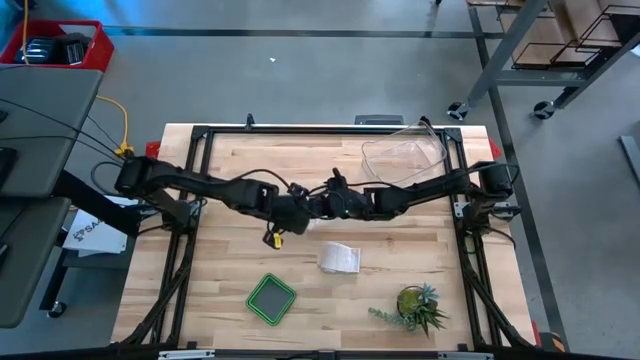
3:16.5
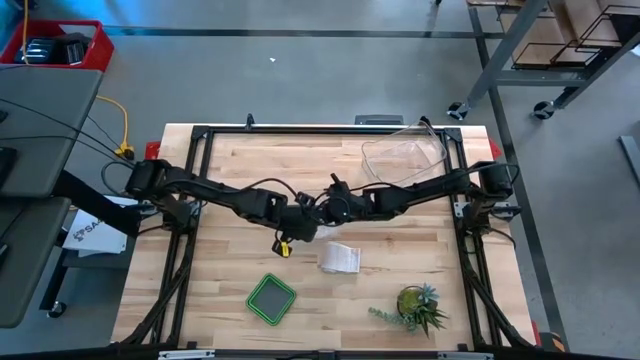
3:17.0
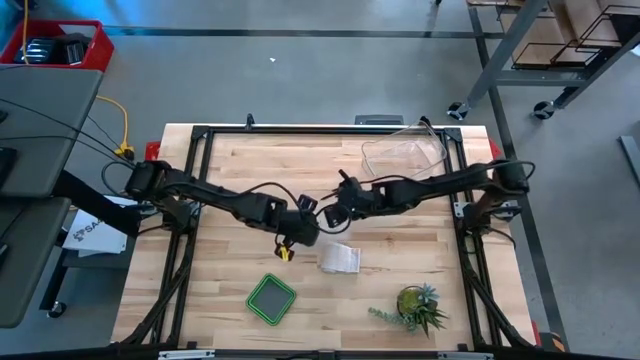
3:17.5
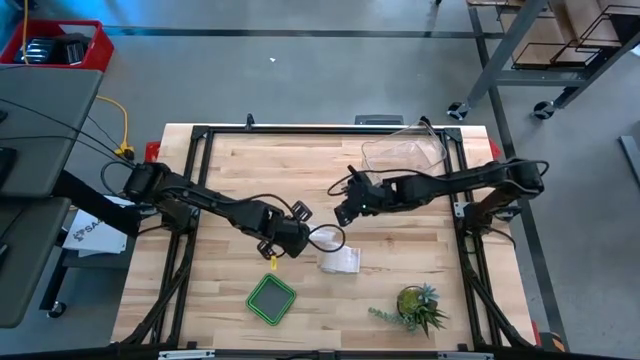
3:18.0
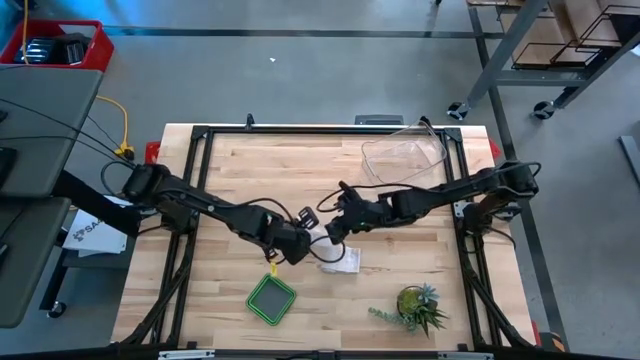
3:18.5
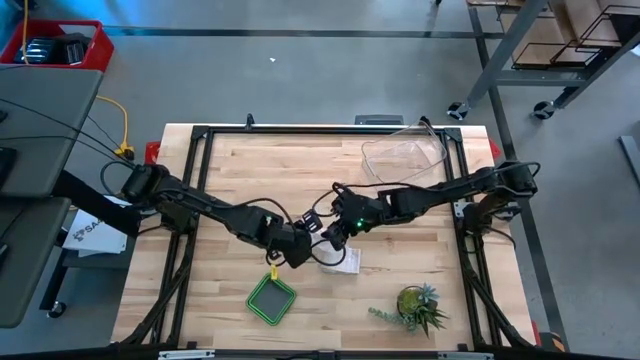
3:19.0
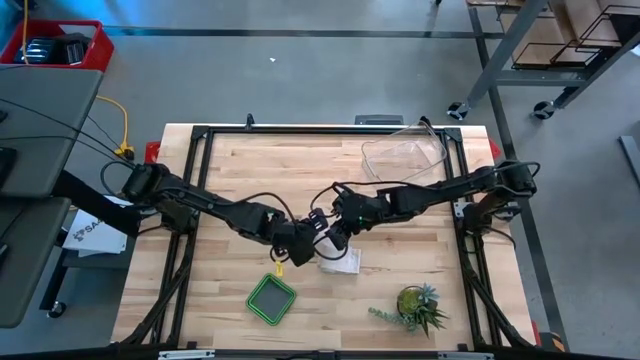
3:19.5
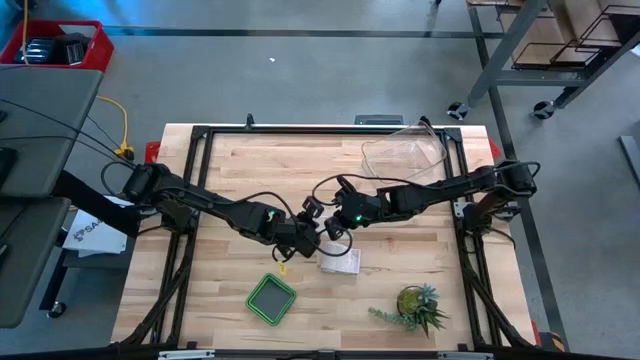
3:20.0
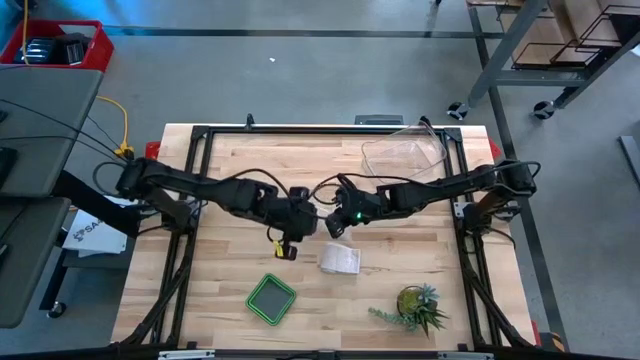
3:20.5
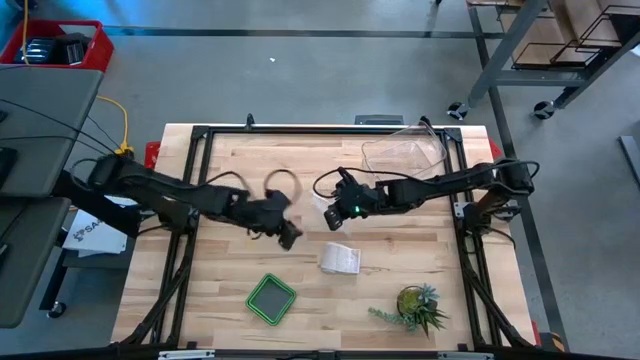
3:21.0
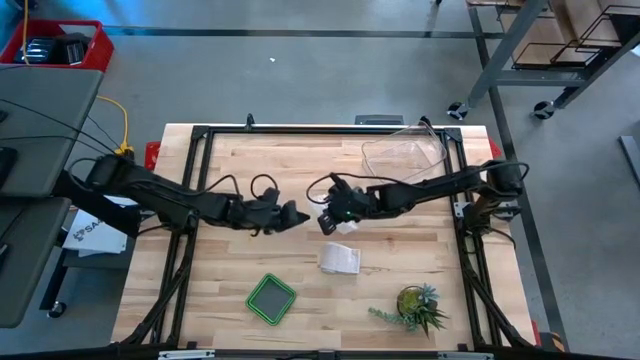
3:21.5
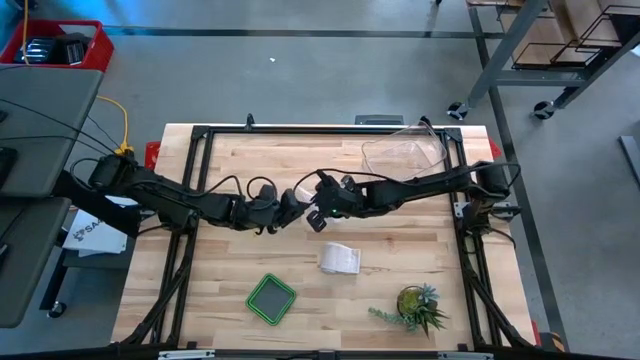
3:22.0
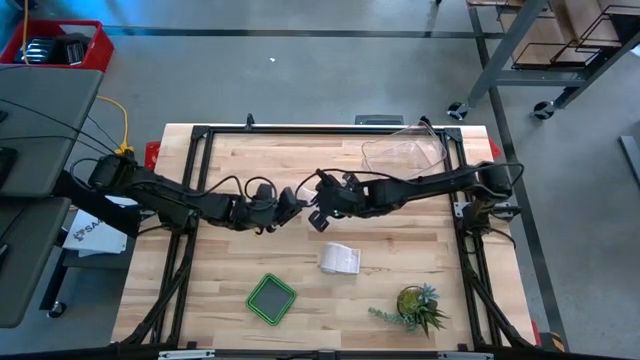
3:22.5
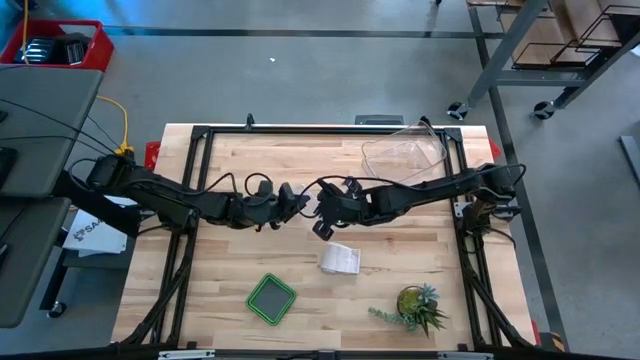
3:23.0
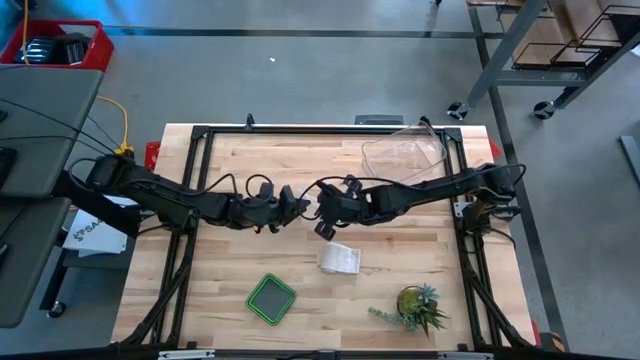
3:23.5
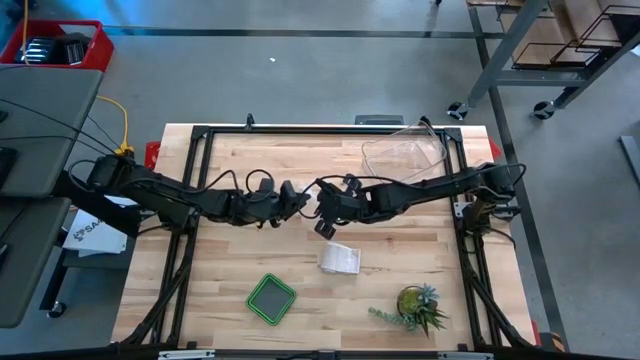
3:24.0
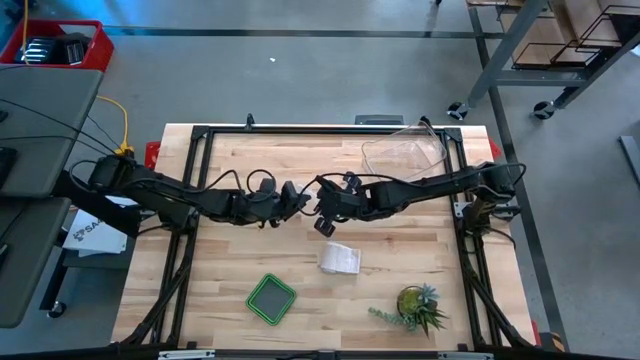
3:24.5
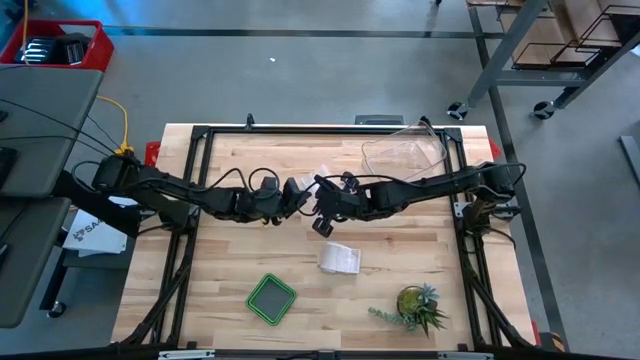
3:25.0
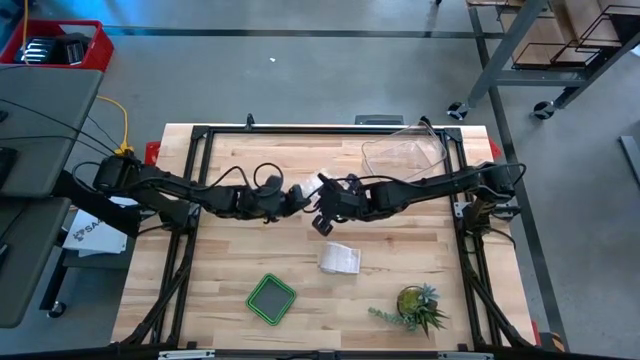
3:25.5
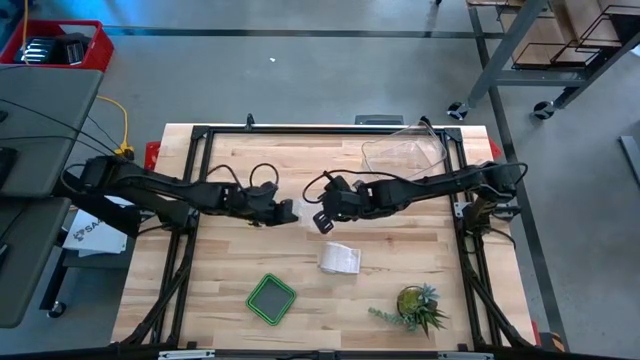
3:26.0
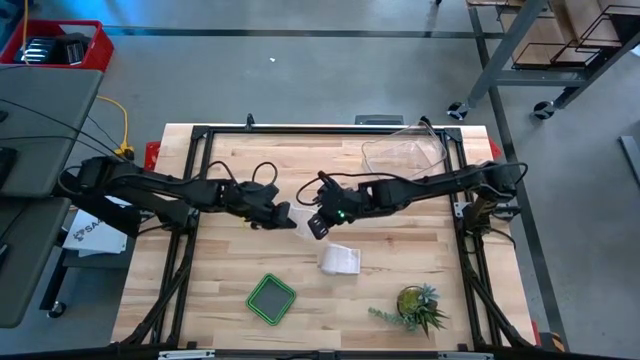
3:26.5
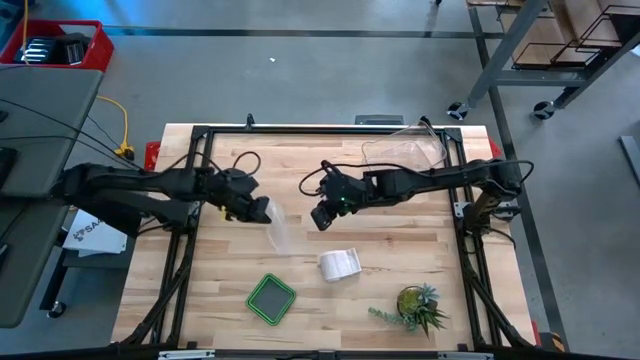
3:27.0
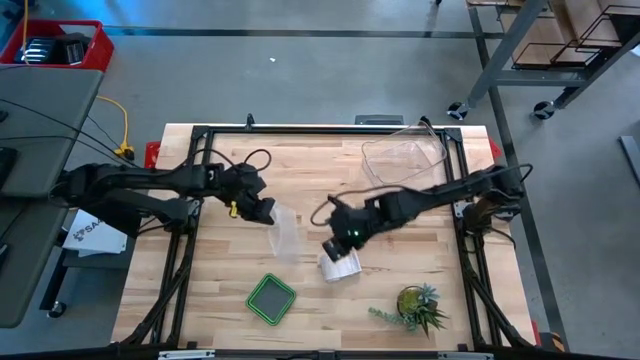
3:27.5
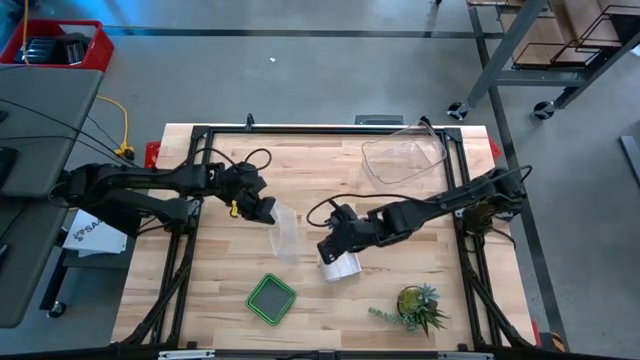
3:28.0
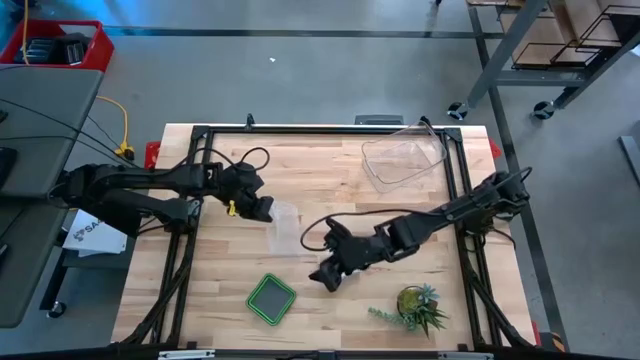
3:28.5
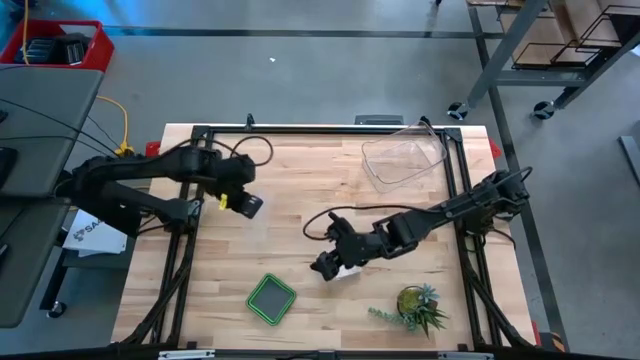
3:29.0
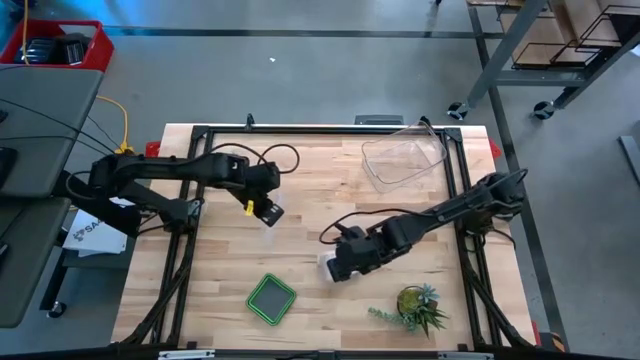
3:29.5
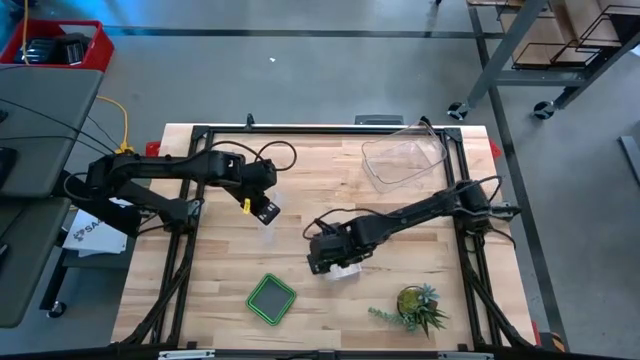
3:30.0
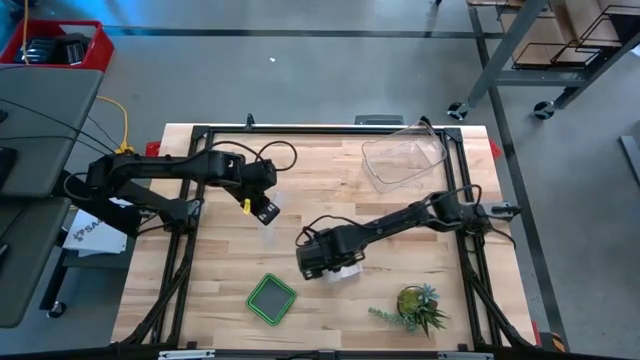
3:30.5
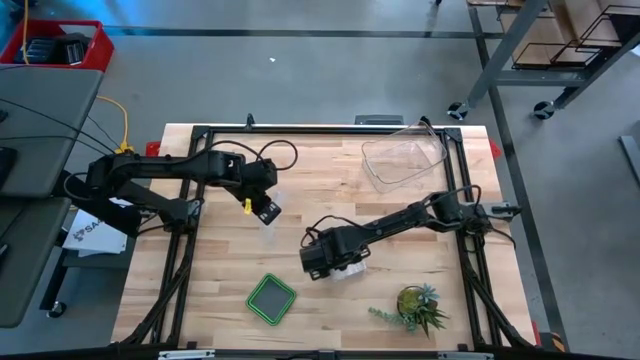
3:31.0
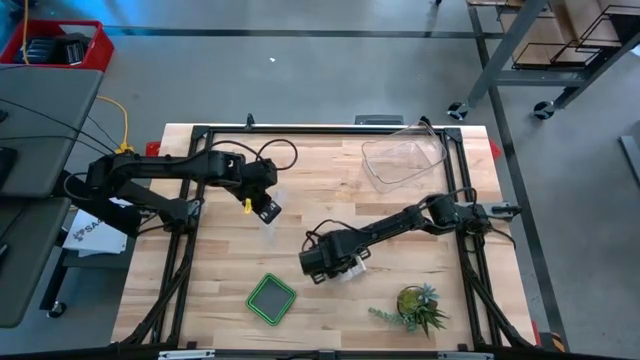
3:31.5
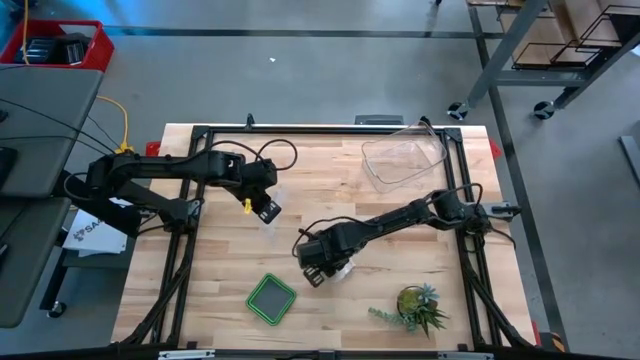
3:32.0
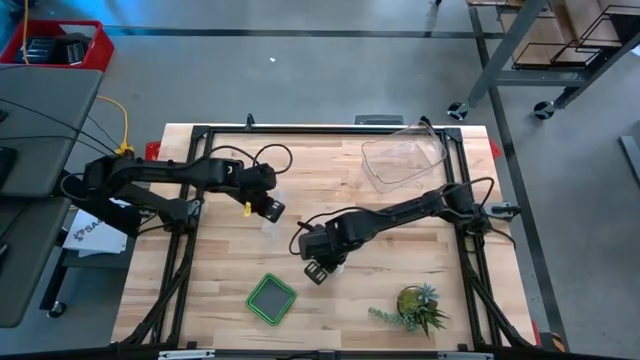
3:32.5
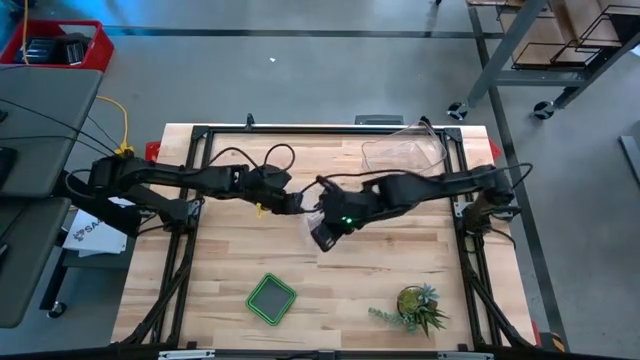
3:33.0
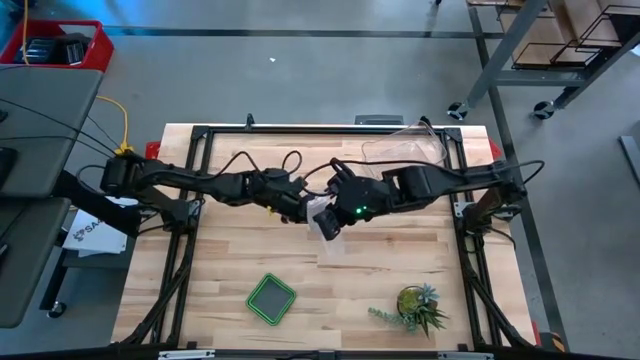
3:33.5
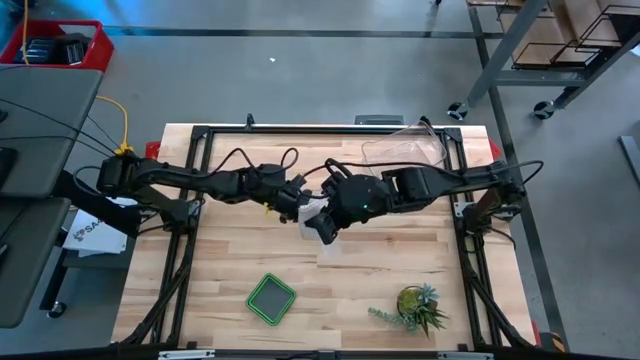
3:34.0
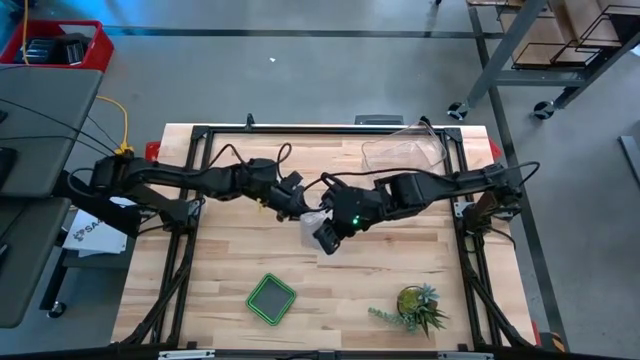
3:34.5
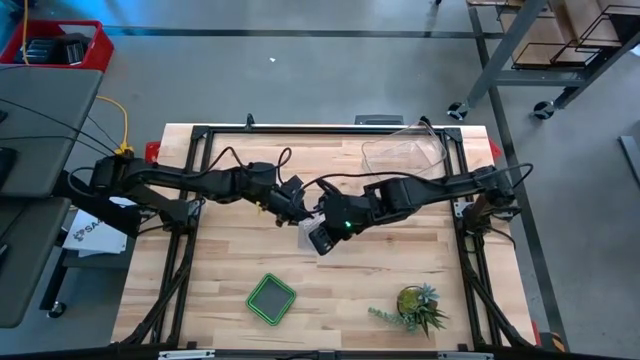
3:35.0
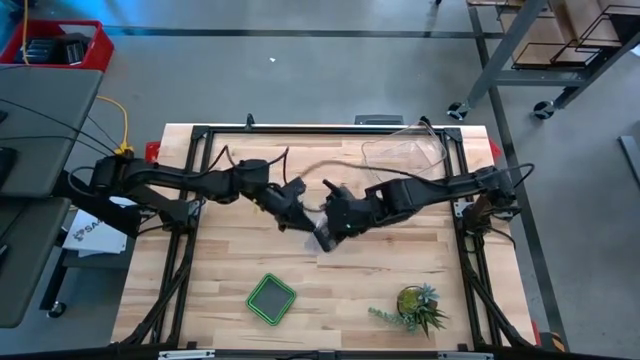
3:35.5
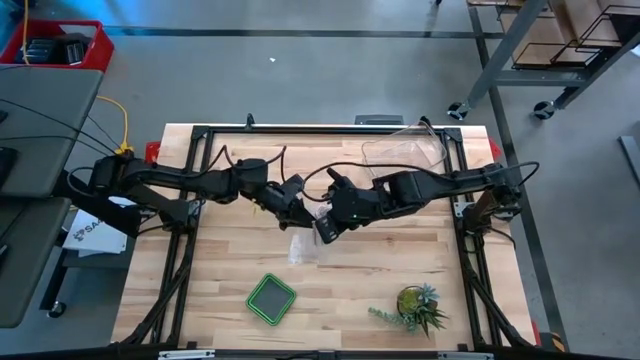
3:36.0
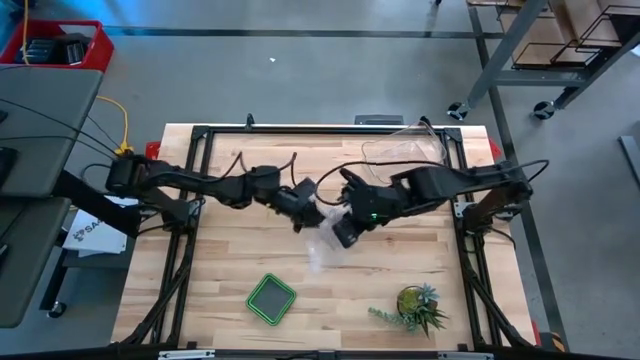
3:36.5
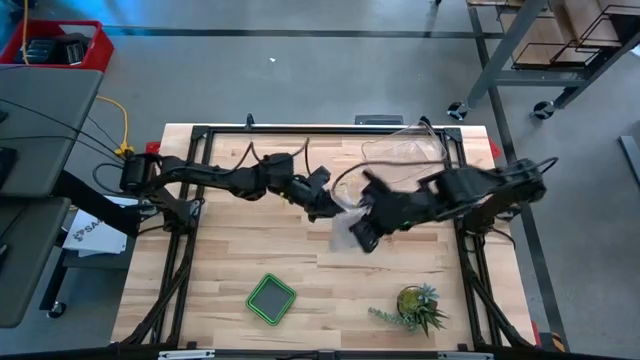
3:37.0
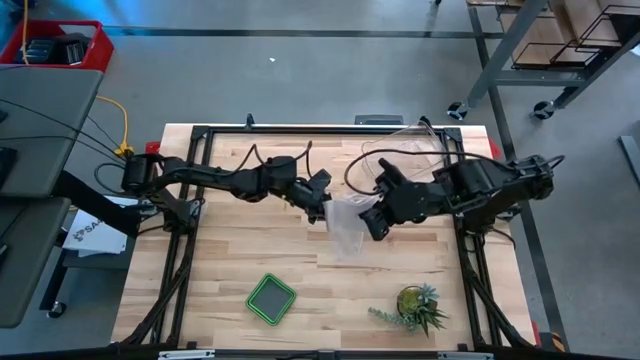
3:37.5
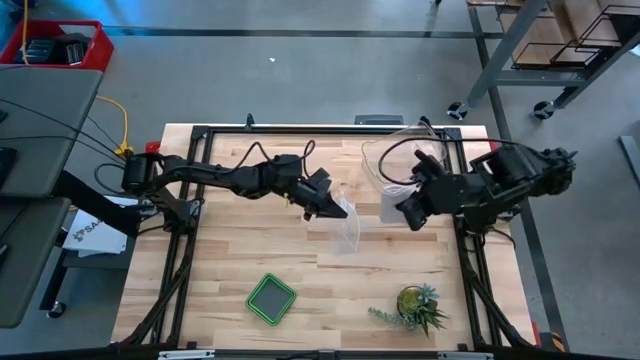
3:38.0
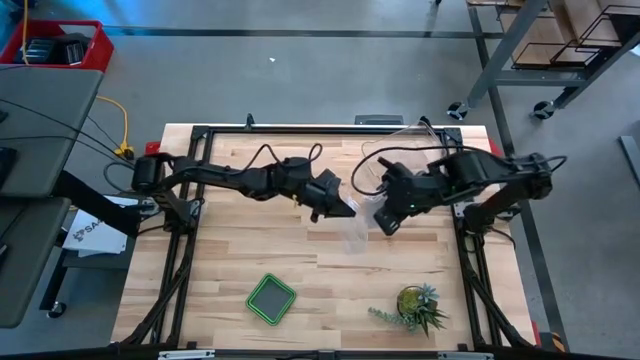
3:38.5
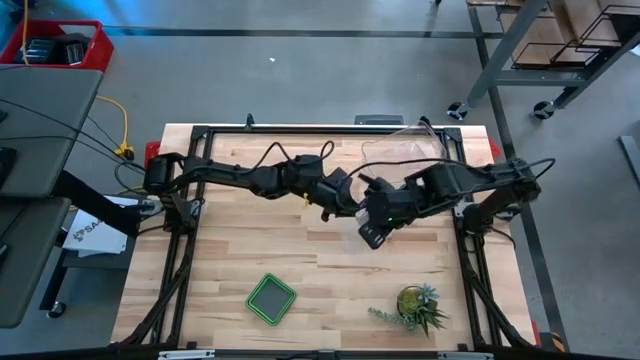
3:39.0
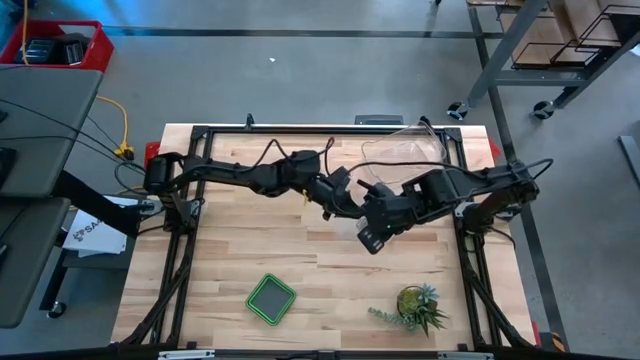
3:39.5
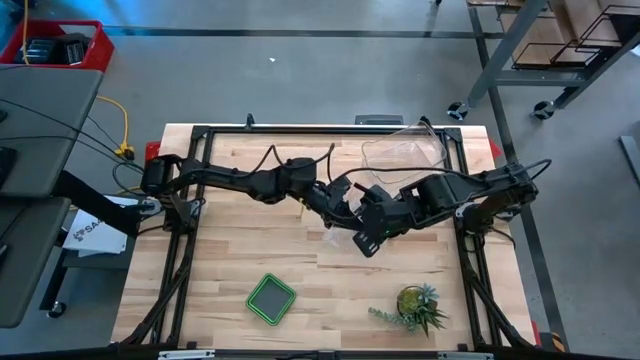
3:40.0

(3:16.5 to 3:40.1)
Task: Roll bandage
Put the rolled white bandage into the transparent zip bag
